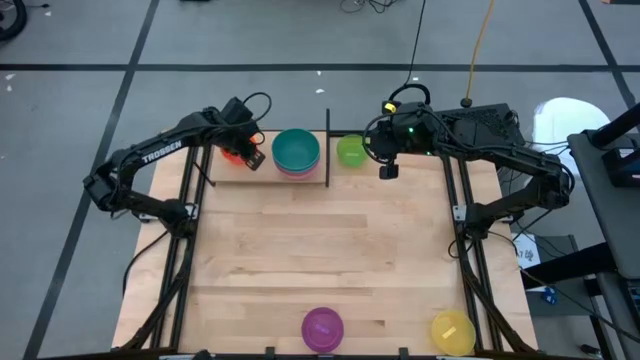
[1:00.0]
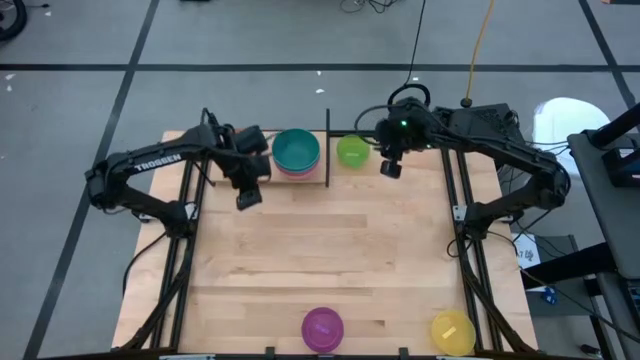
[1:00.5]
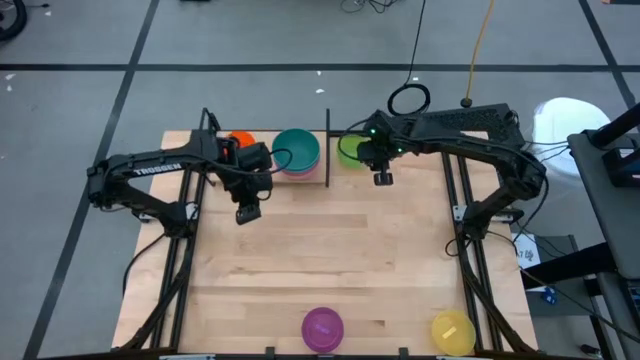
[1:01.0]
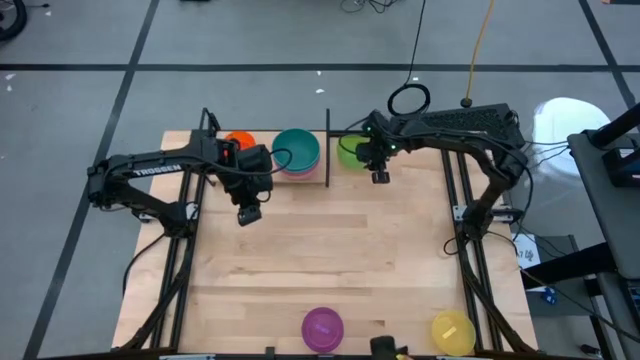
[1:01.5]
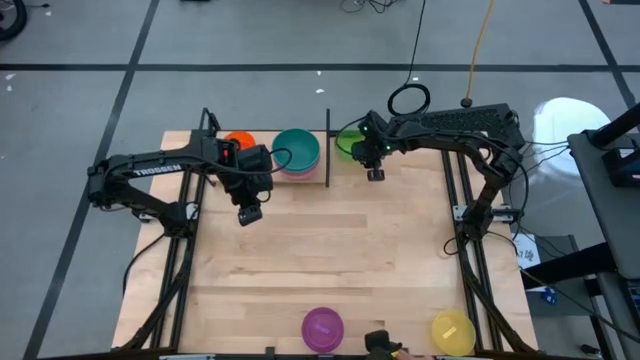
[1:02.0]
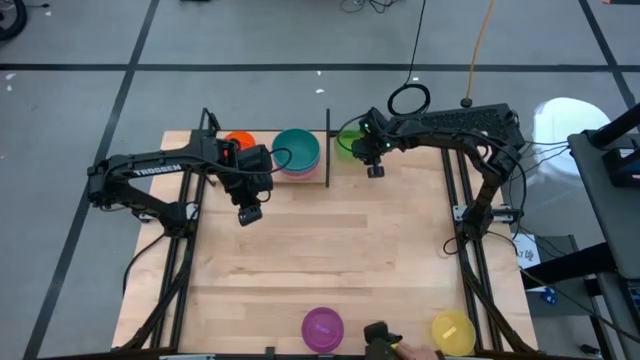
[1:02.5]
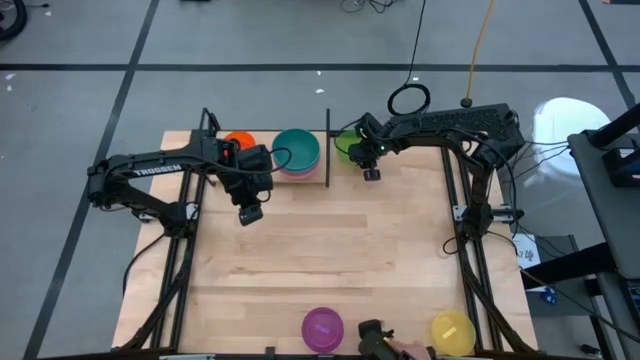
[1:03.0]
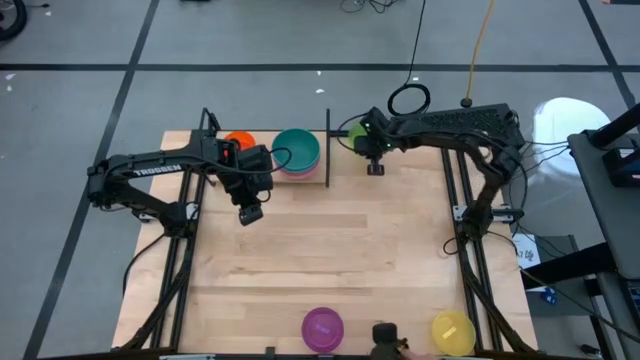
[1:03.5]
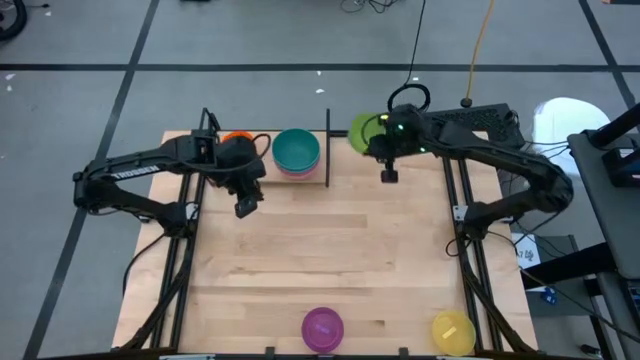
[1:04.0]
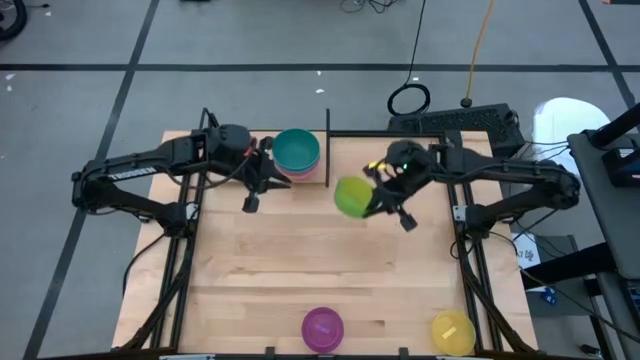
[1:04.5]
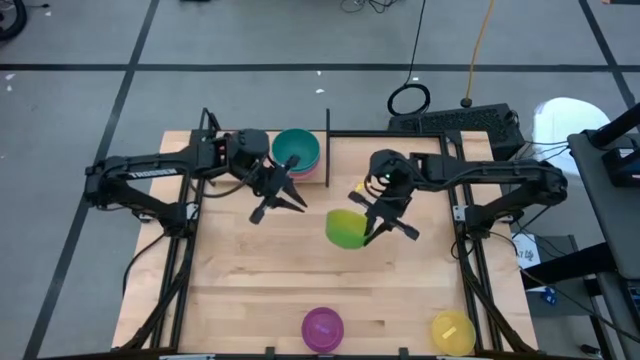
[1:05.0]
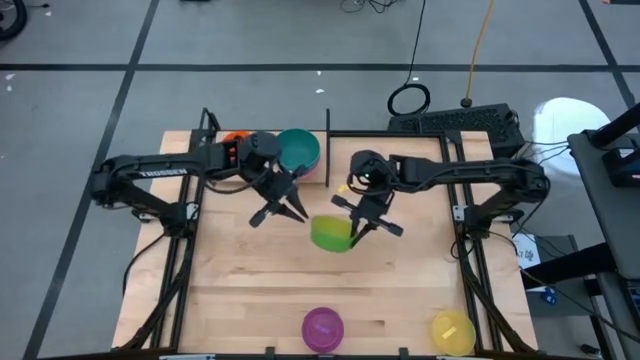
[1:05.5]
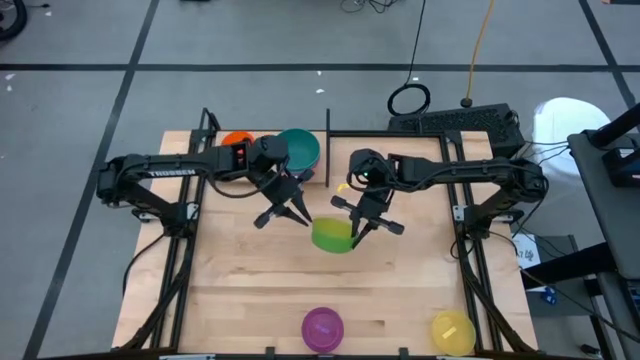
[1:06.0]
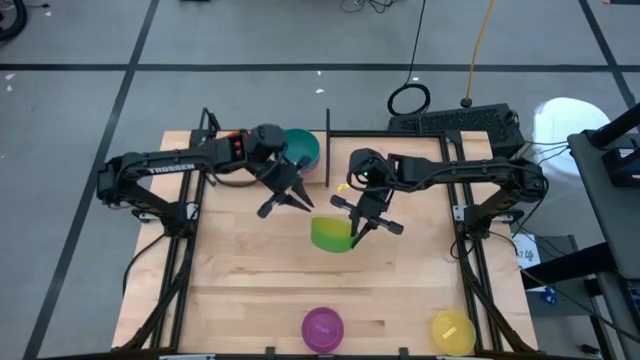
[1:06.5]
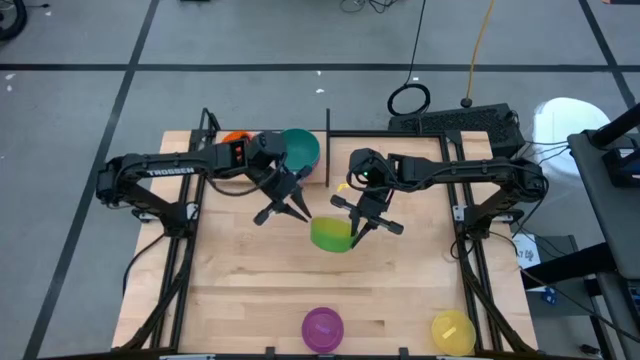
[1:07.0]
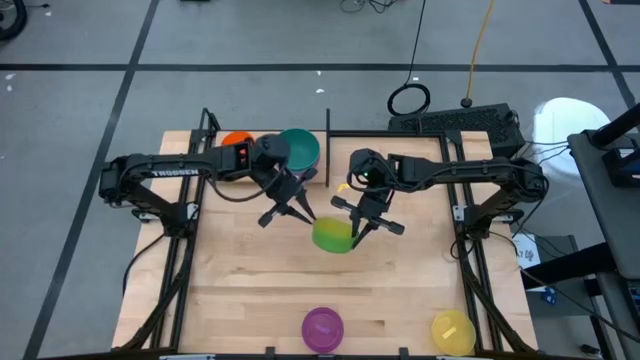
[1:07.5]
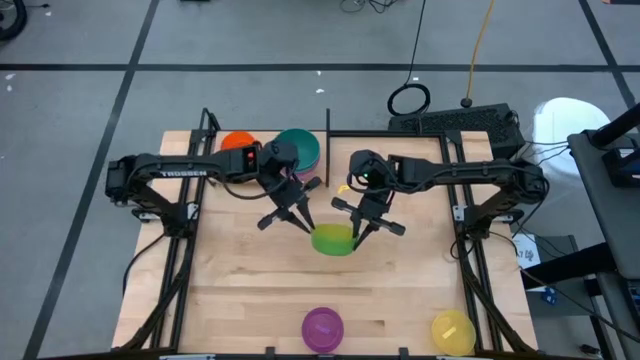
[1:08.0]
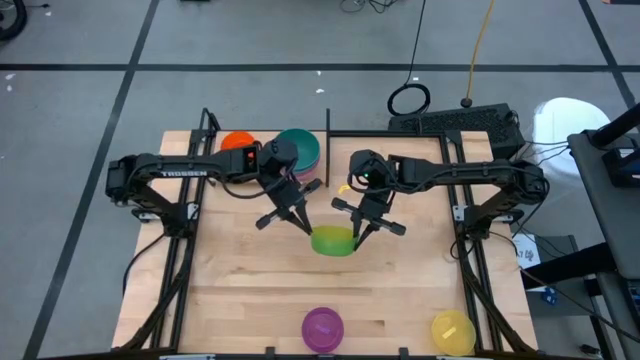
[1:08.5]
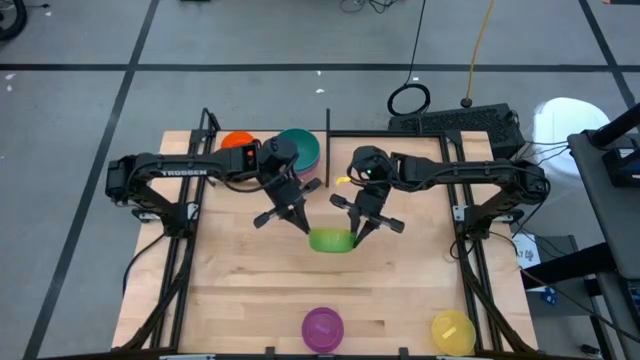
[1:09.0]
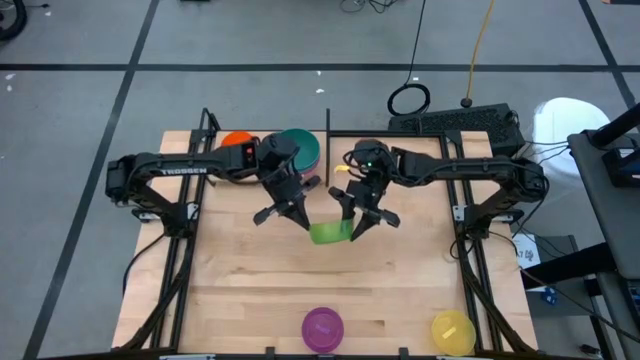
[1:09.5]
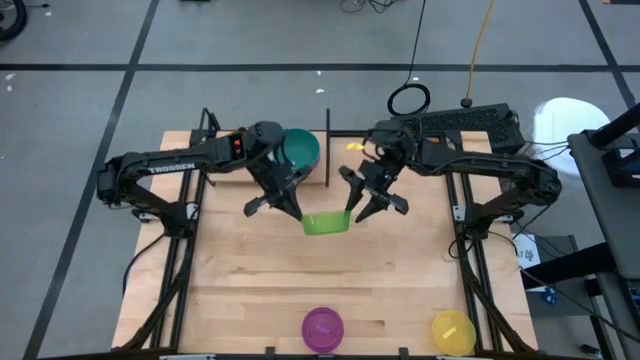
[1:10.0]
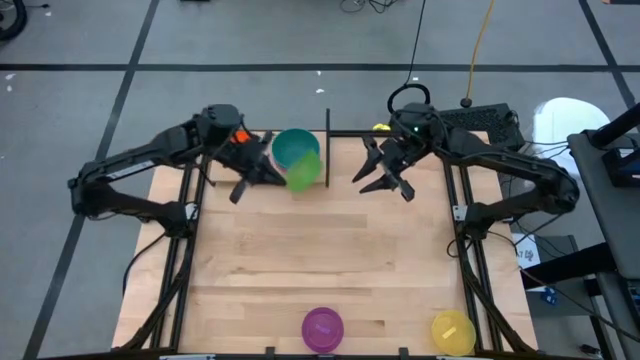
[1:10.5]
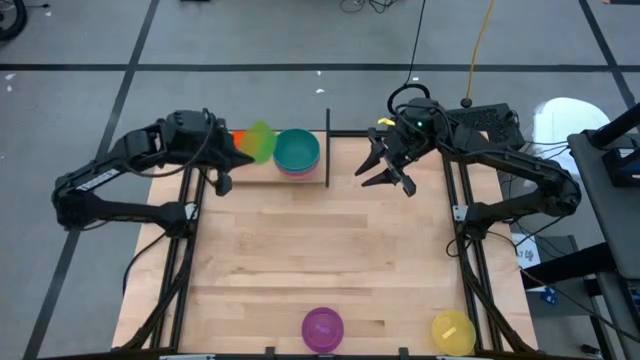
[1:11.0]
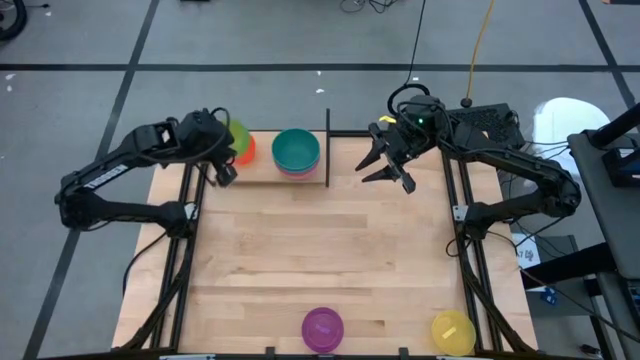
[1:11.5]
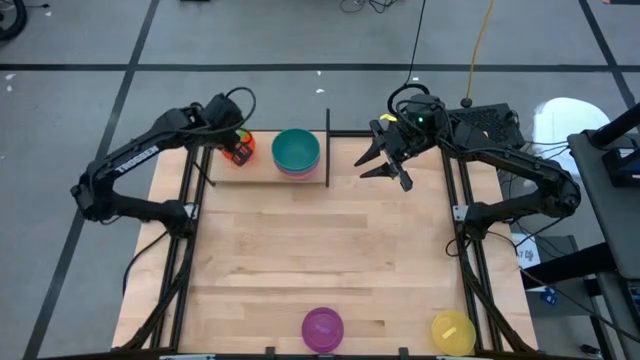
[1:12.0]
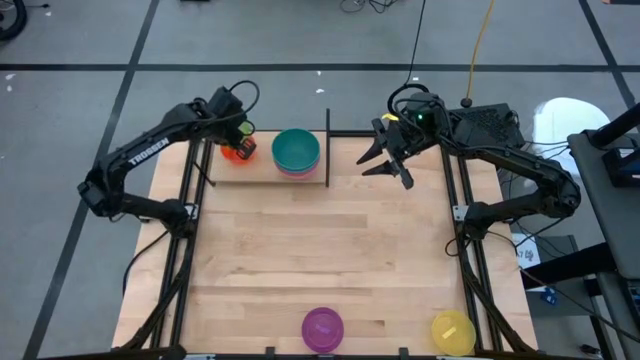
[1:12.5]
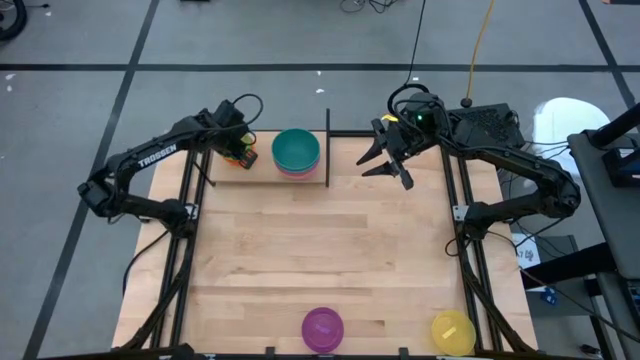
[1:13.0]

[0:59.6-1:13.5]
Task: Place and stack bowls onto a shelf
Stack the green bowl on the orange bowl on the shelf

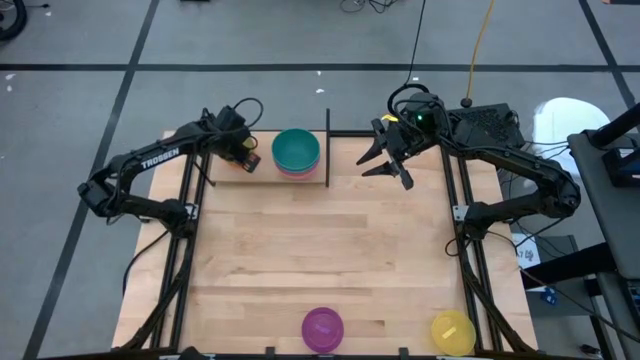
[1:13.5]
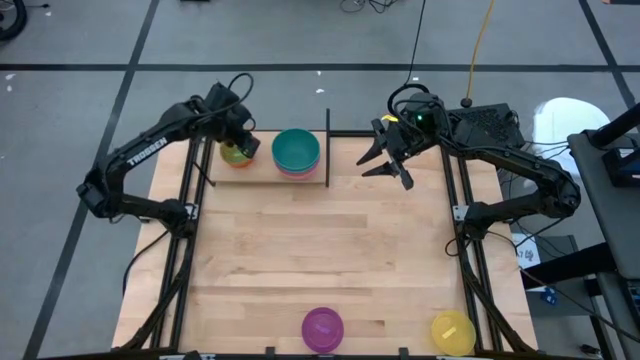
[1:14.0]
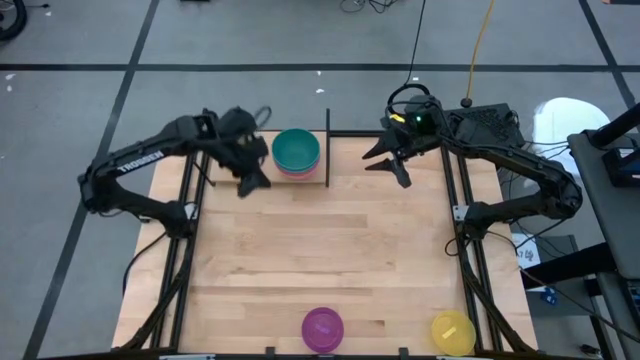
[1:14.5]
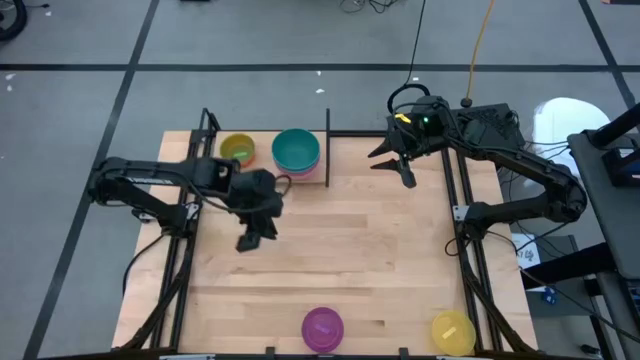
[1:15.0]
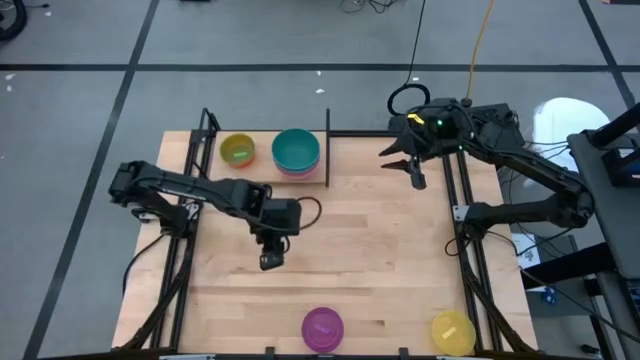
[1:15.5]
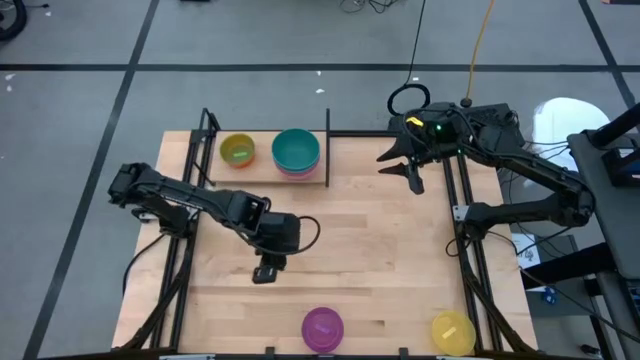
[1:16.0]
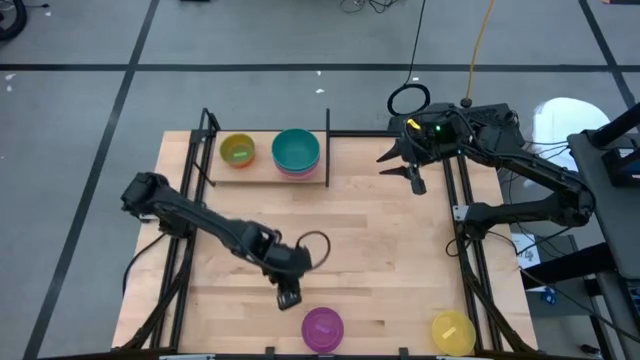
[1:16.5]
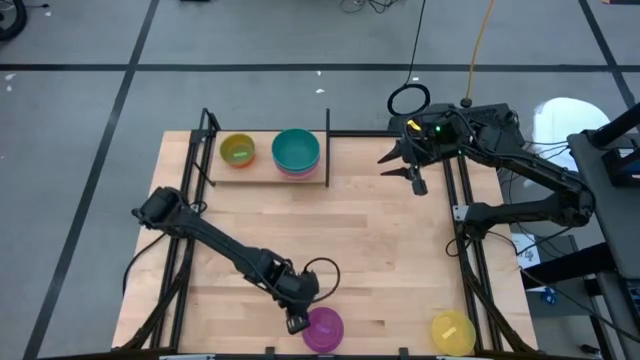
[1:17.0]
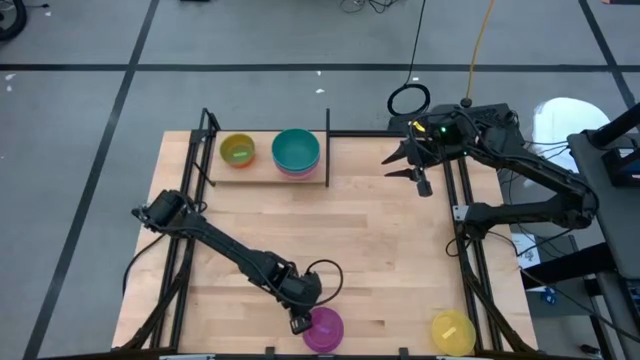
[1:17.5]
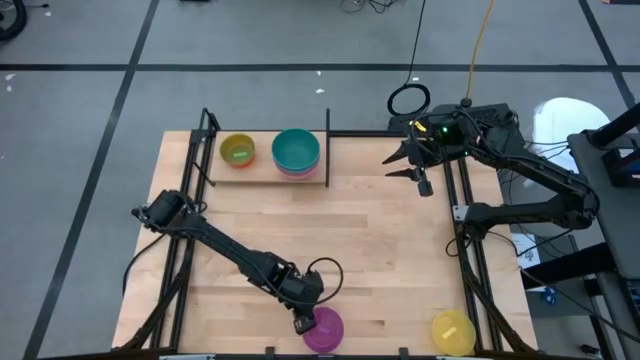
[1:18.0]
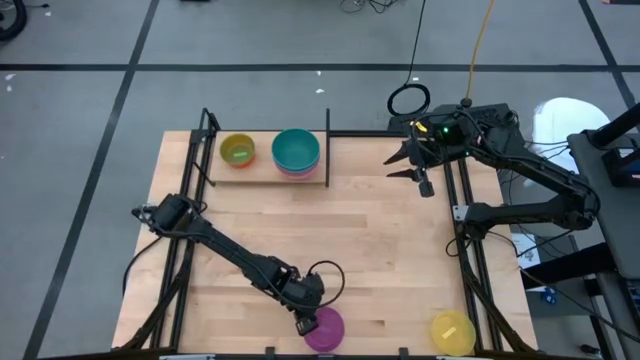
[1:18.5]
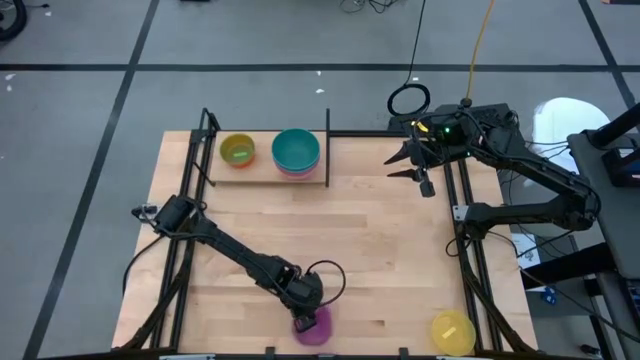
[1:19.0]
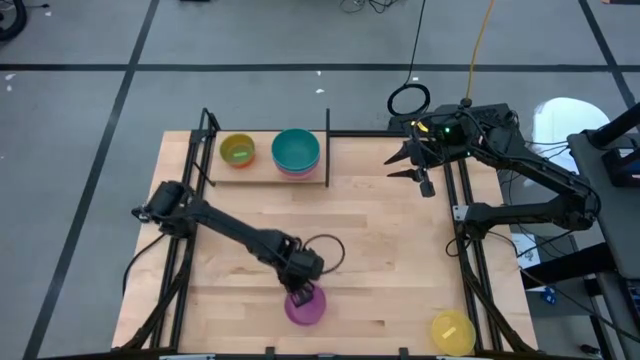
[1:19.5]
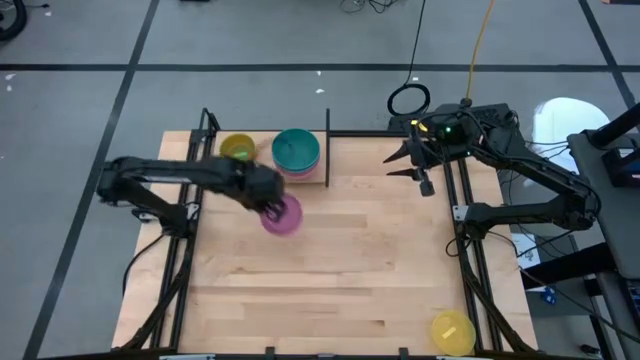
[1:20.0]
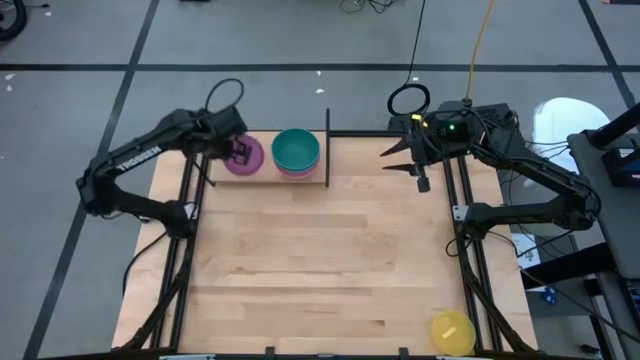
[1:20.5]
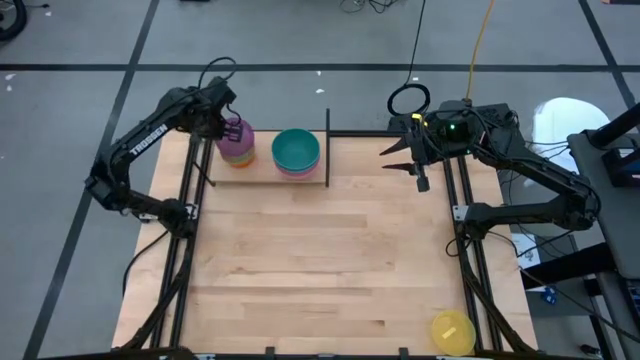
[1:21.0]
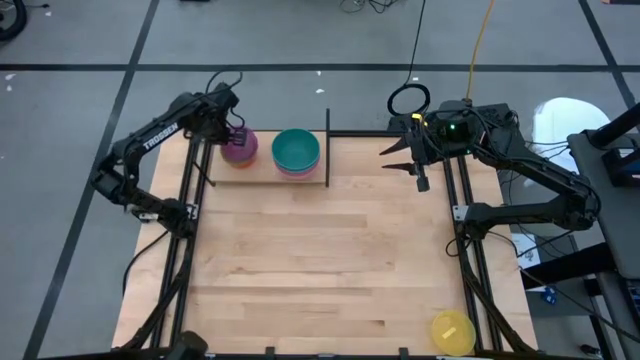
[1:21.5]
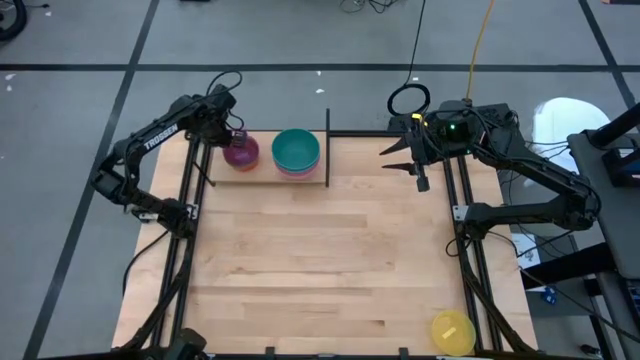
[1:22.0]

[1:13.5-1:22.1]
Stack the purple bowl on the green bowl on the shelf
